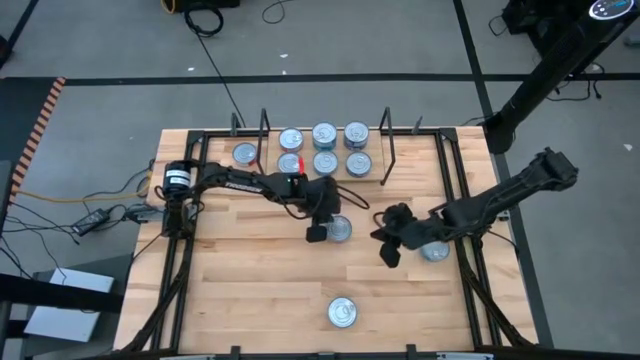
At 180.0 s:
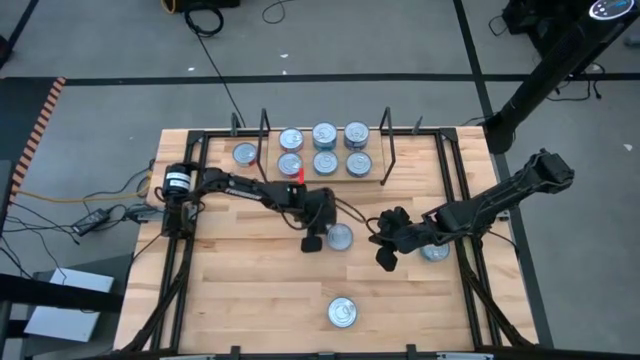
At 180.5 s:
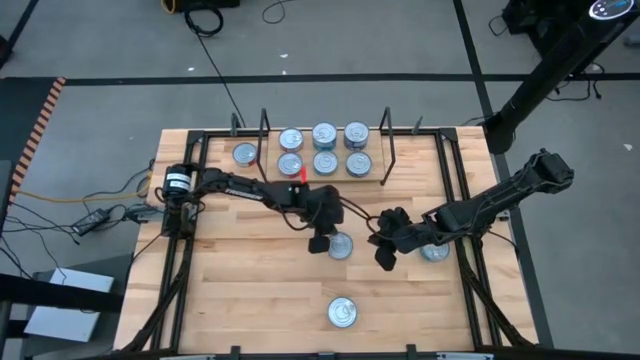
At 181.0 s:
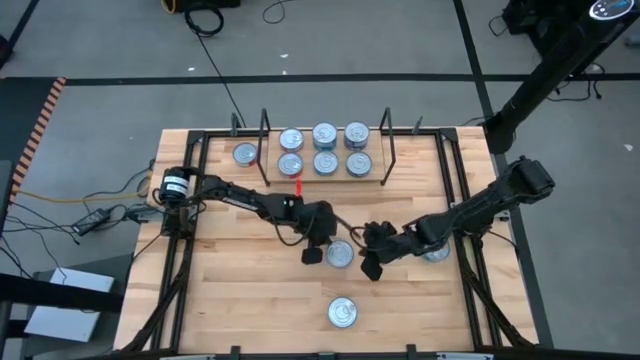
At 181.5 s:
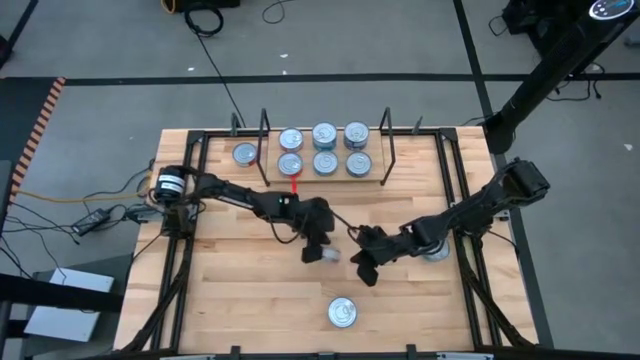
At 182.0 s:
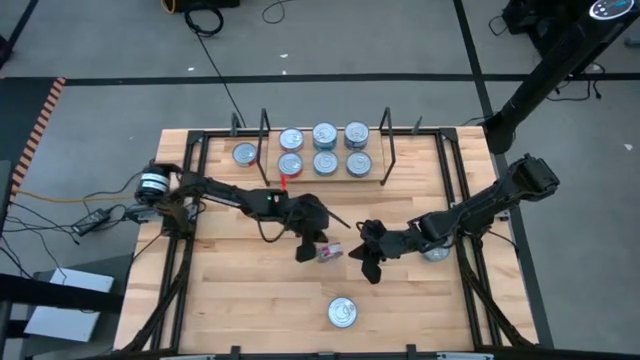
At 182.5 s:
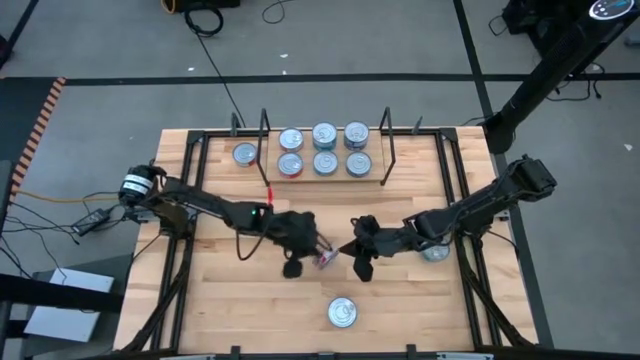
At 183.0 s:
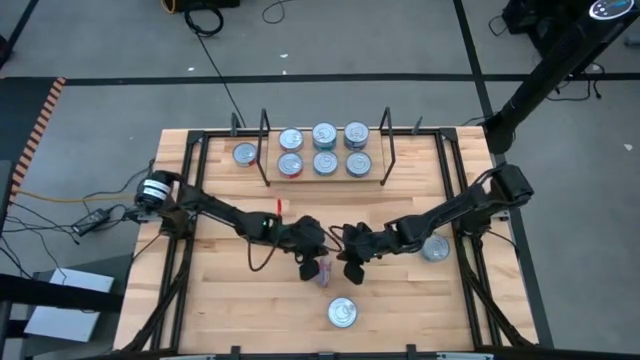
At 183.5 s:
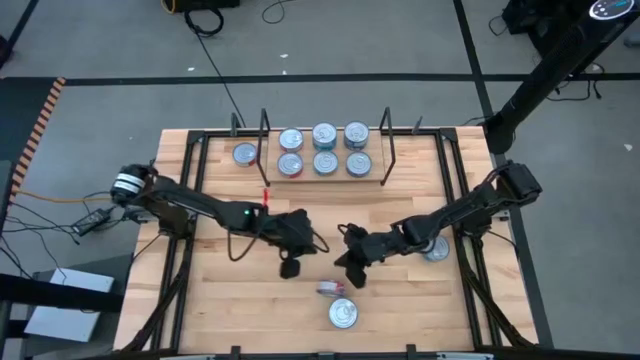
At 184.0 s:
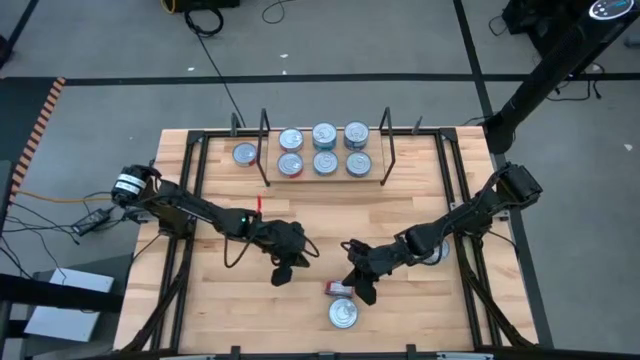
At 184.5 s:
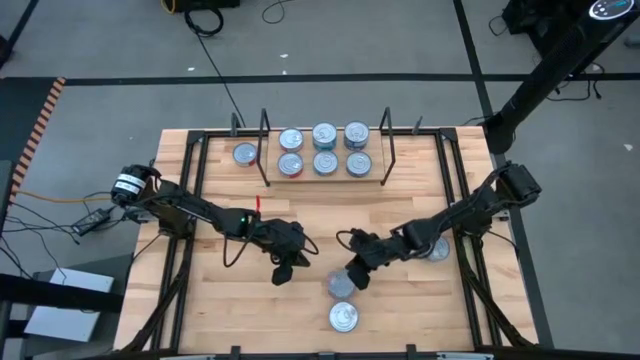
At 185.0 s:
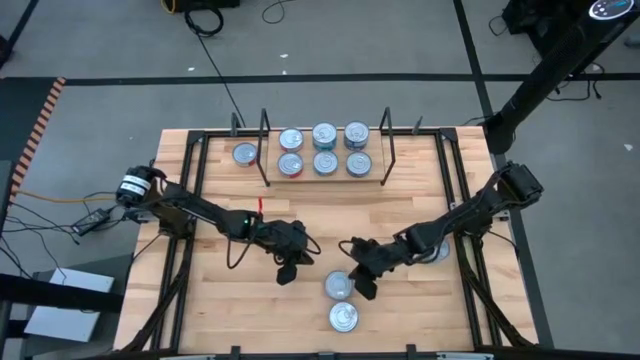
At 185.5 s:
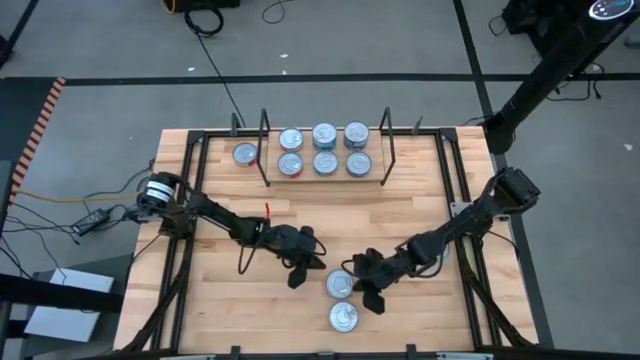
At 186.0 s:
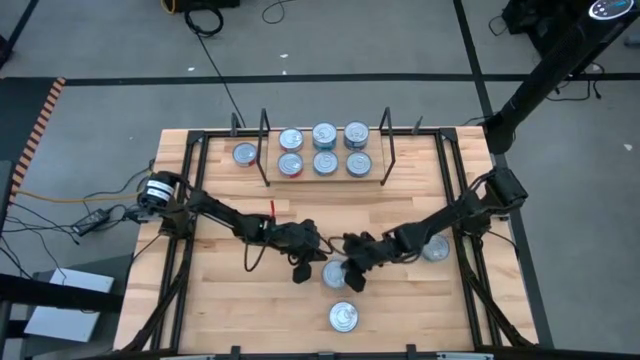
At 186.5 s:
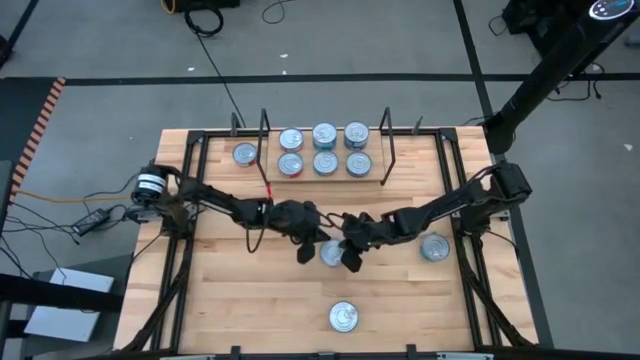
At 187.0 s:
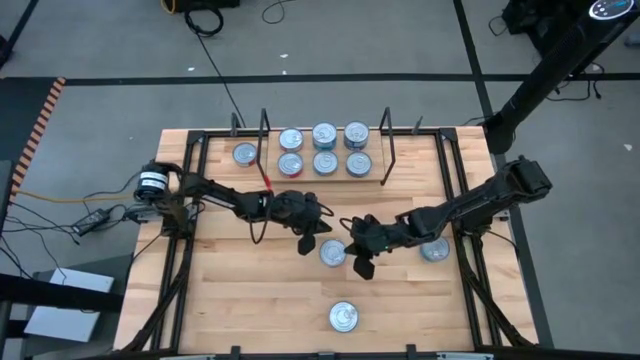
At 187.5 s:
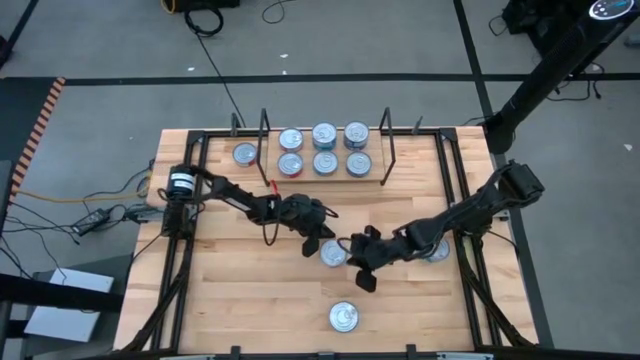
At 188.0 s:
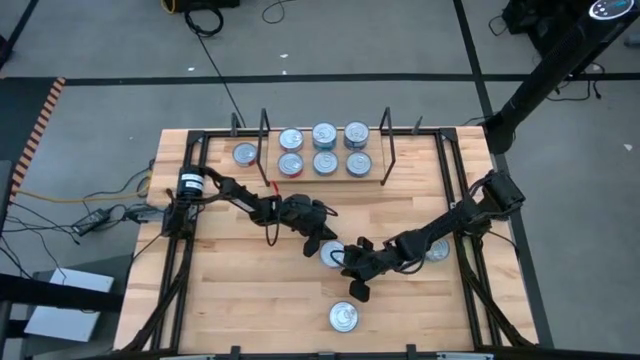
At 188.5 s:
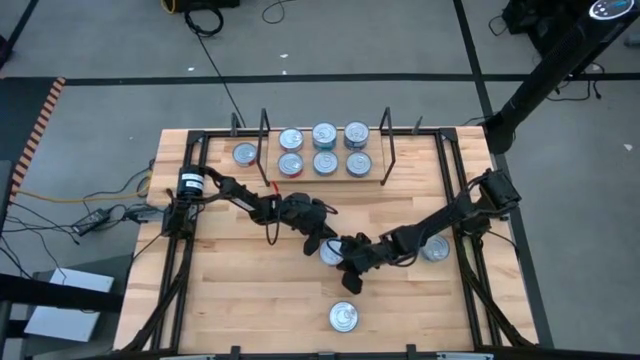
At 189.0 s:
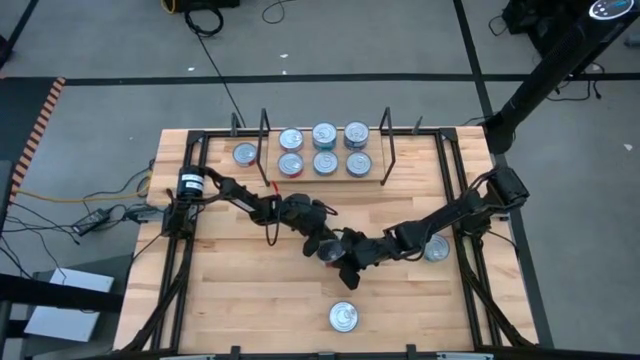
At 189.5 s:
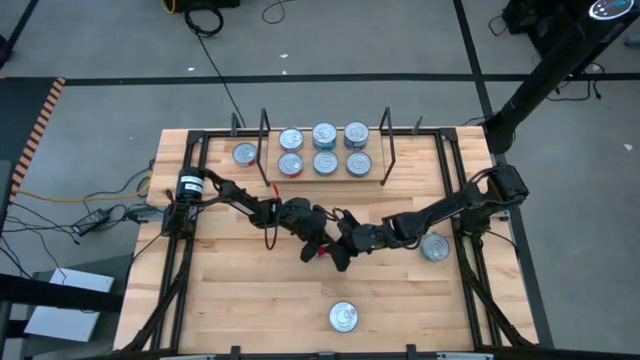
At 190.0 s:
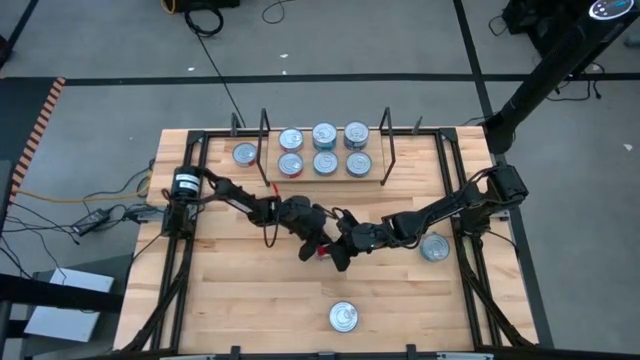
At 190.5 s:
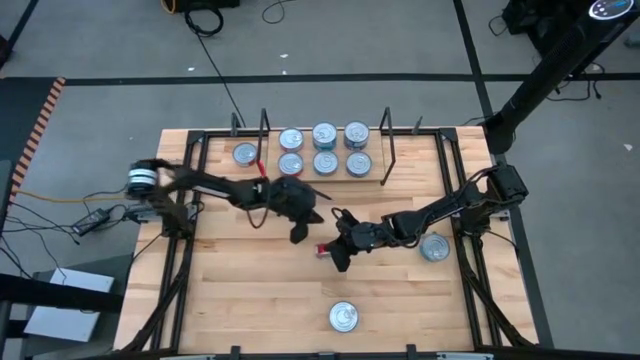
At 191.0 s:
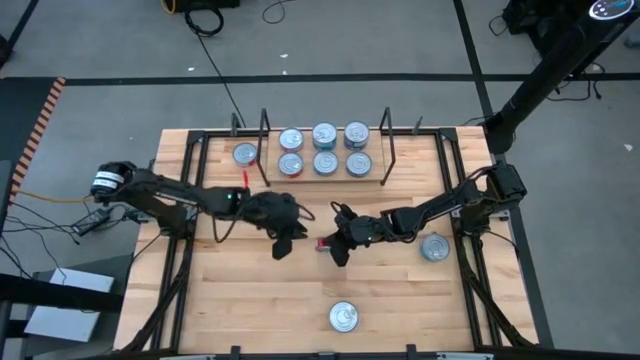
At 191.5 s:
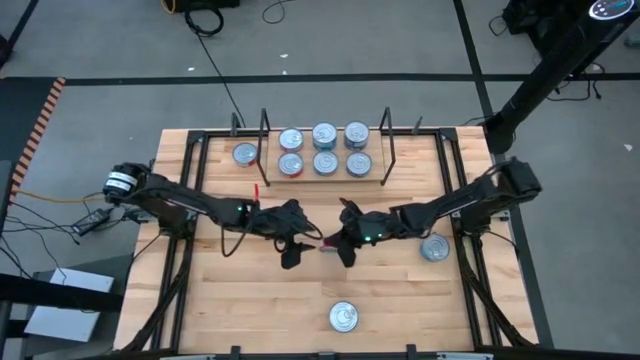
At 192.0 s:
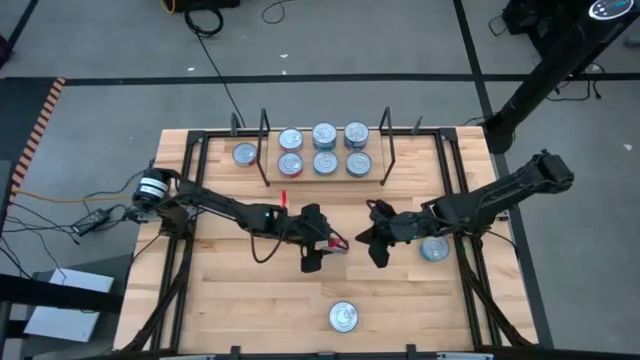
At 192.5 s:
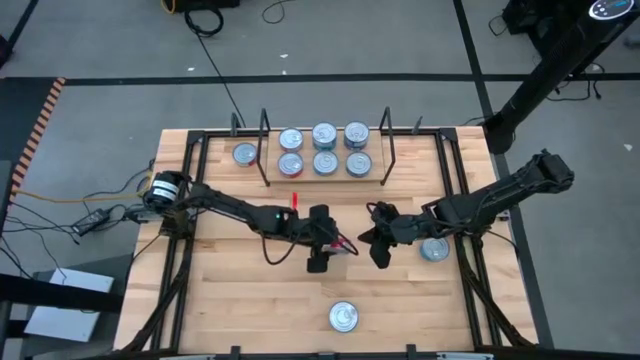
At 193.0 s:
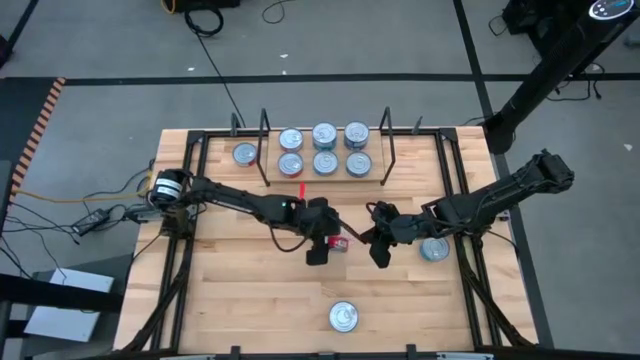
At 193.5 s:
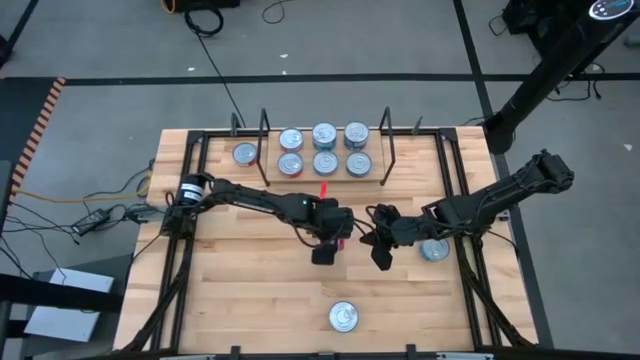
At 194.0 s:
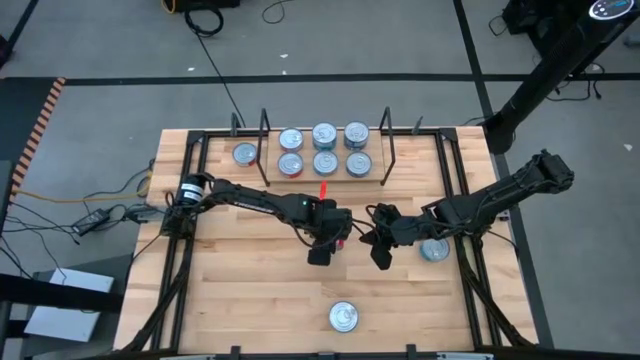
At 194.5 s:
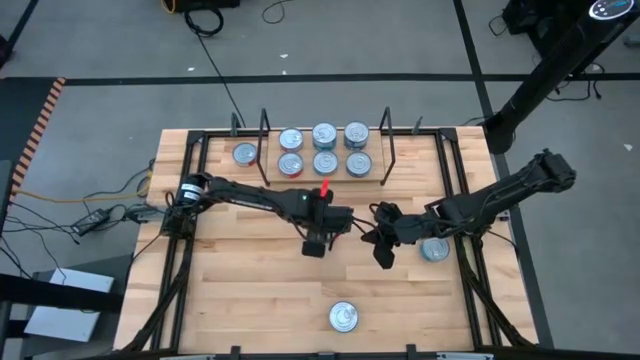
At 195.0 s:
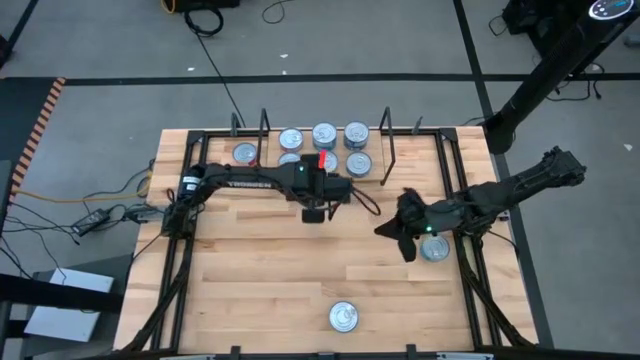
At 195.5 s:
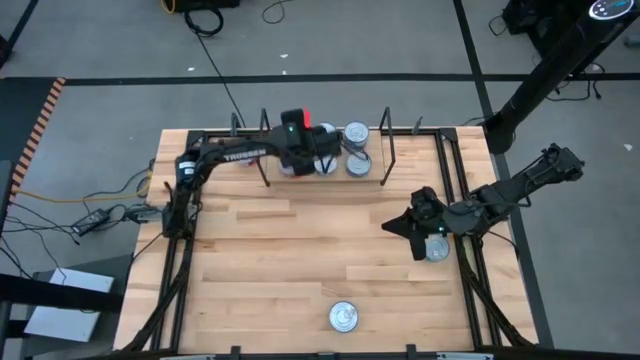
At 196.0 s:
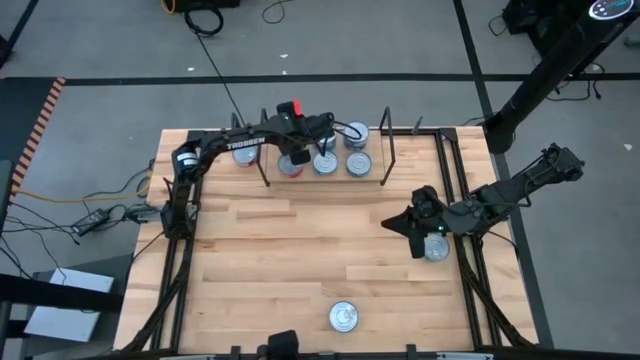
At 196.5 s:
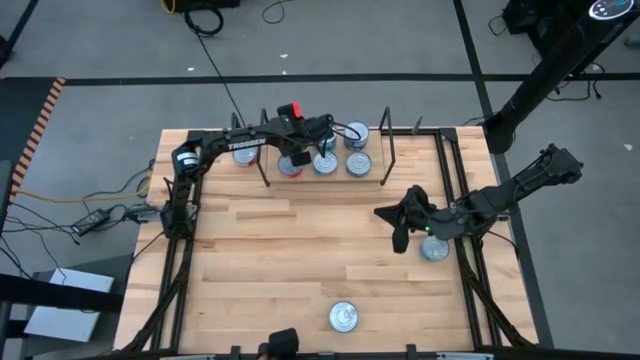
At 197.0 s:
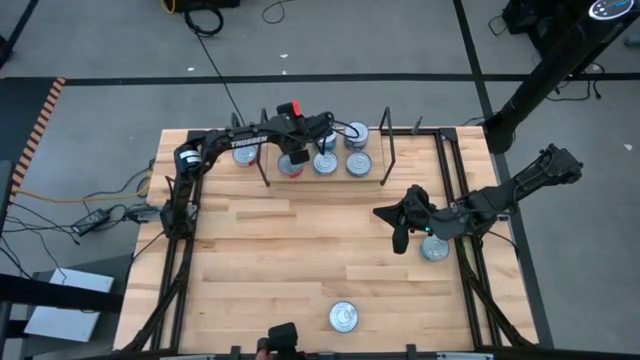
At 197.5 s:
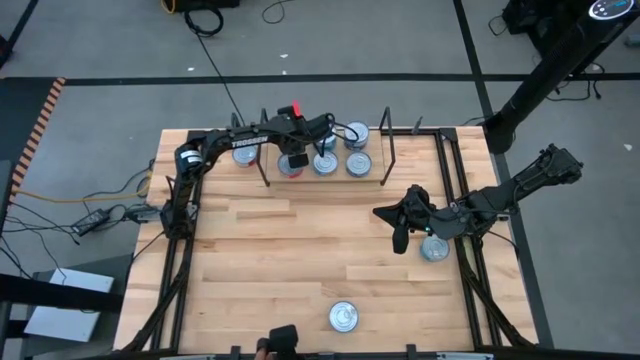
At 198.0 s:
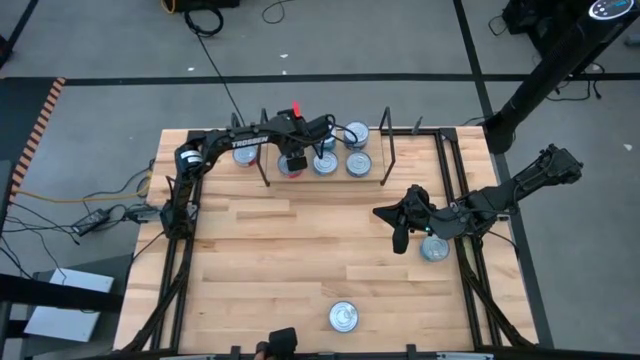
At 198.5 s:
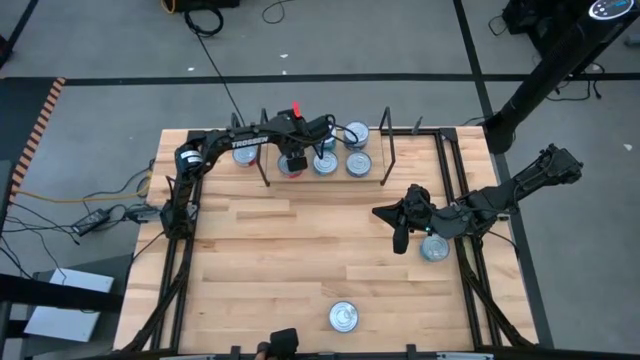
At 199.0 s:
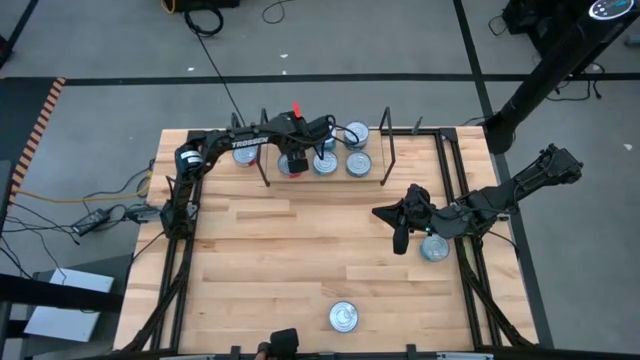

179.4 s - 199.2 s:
Task: Stack canned seafood by type on shelf
Stack the red tuna can on top of the other red tuna can on the shelf

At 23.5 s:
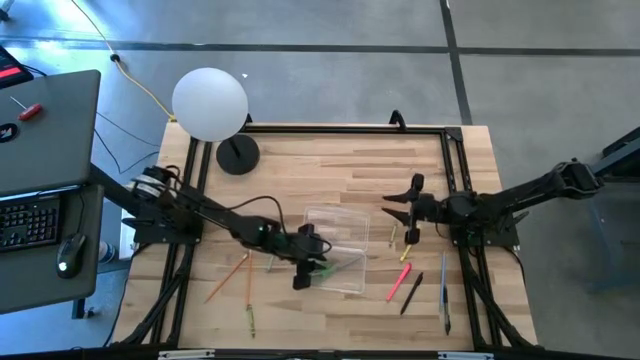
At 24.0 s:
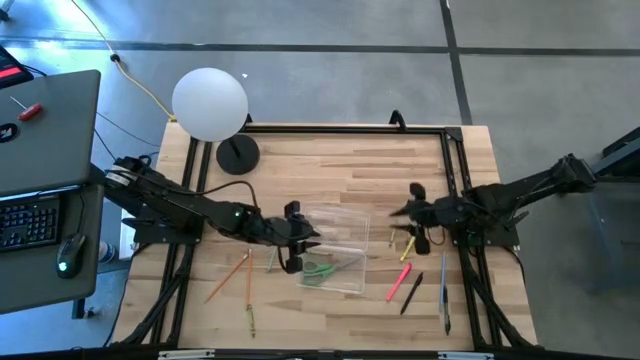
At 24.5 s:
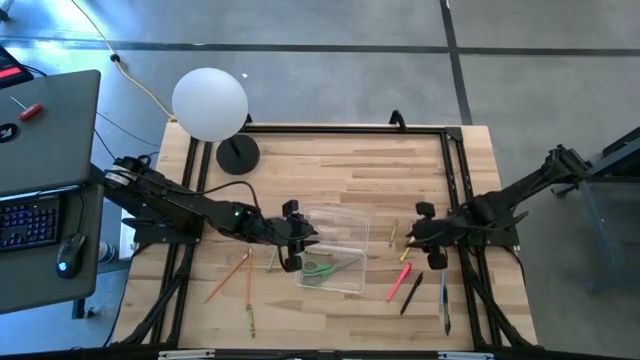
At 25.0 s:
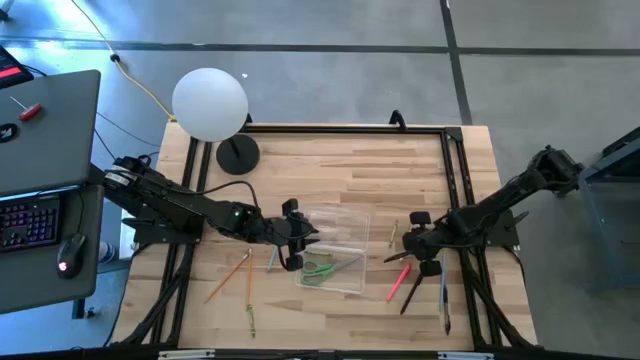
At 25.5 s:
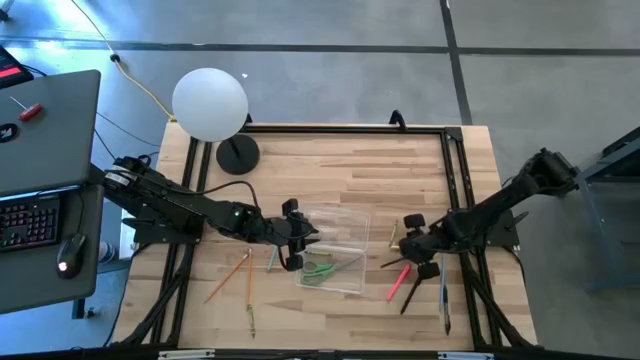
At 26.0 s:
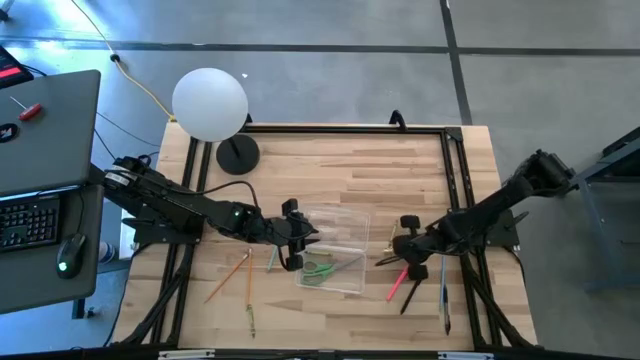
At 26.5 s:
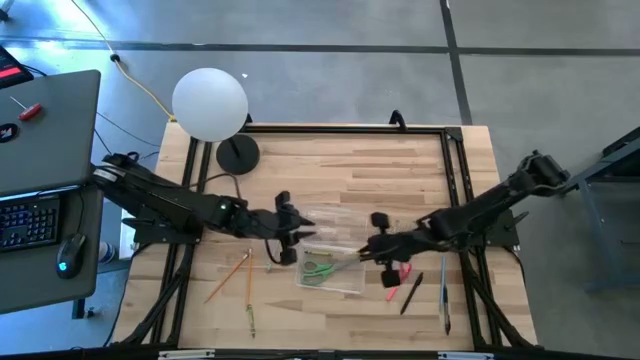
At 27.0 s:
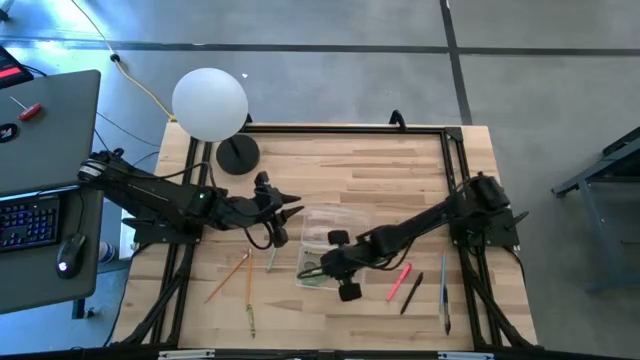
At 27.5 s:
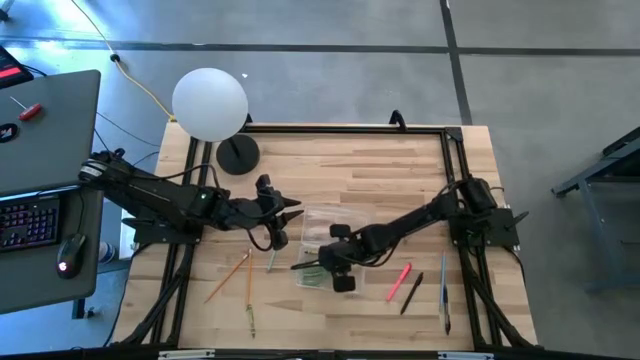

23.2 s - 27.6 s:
Task: Pick & place school supplies into a supply box
Put the yellow pen into the transparent supply box
